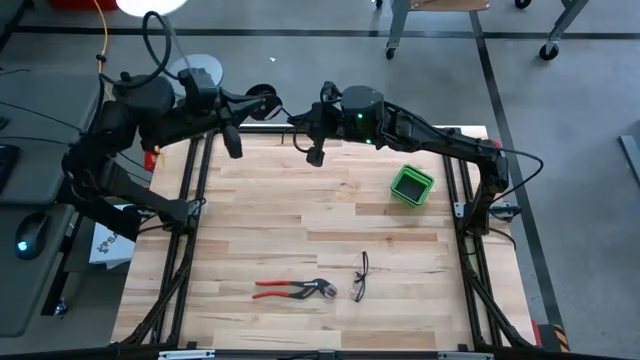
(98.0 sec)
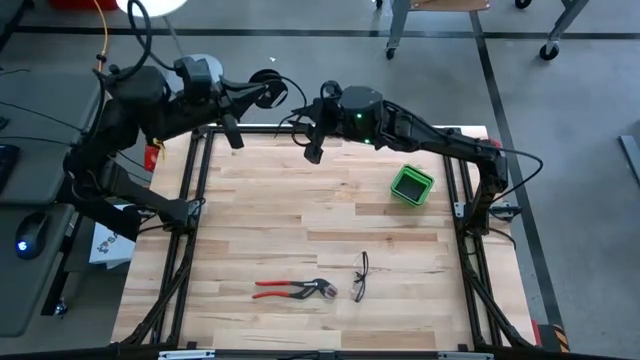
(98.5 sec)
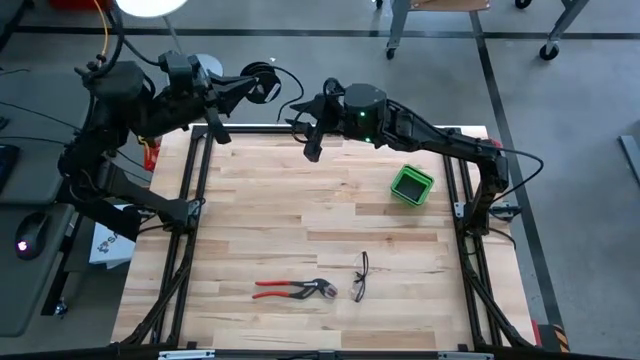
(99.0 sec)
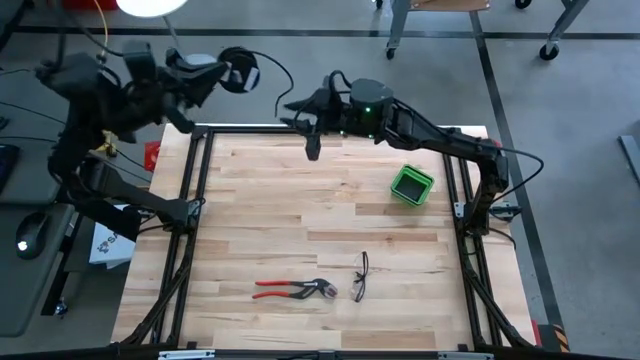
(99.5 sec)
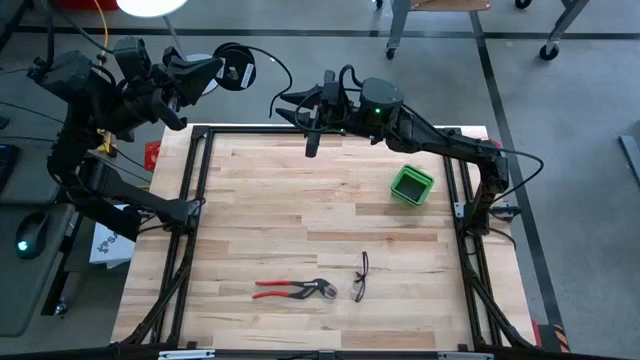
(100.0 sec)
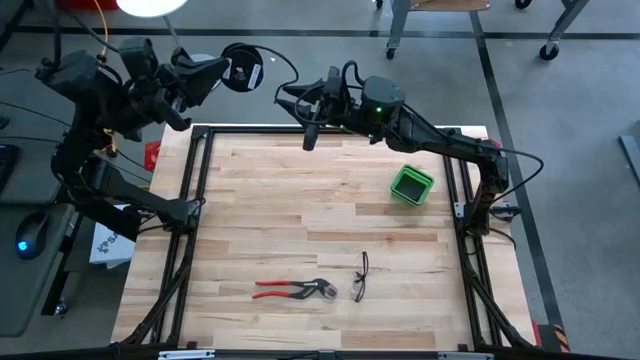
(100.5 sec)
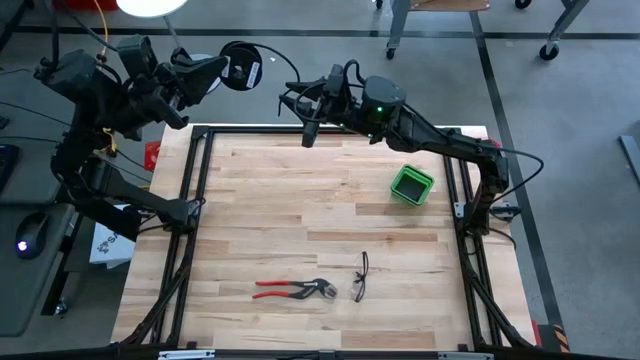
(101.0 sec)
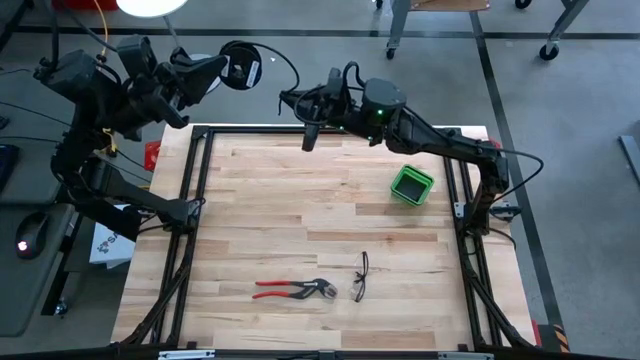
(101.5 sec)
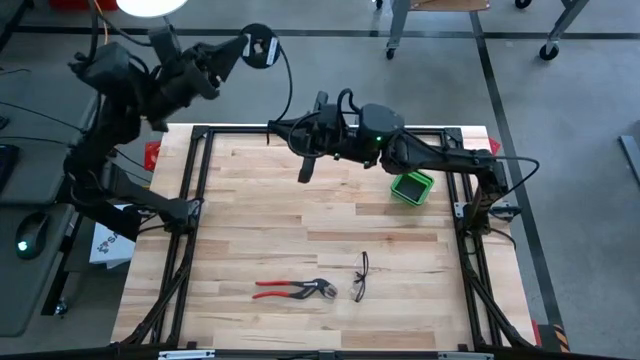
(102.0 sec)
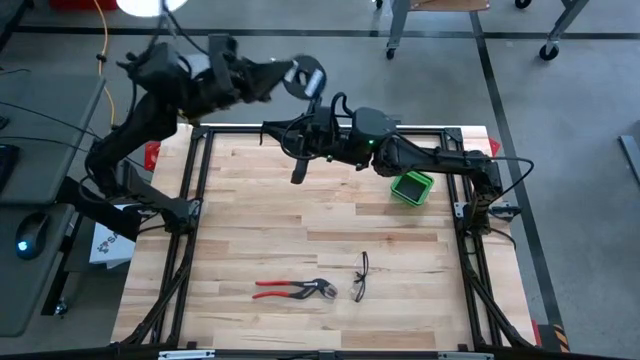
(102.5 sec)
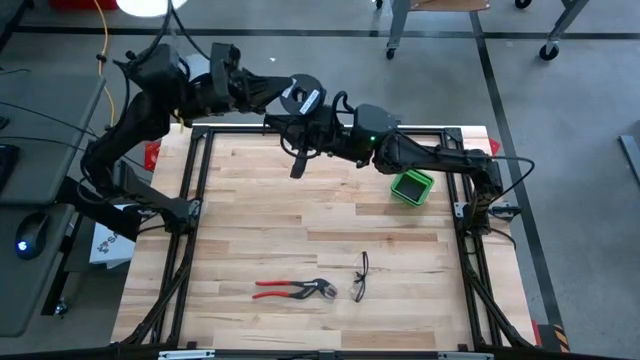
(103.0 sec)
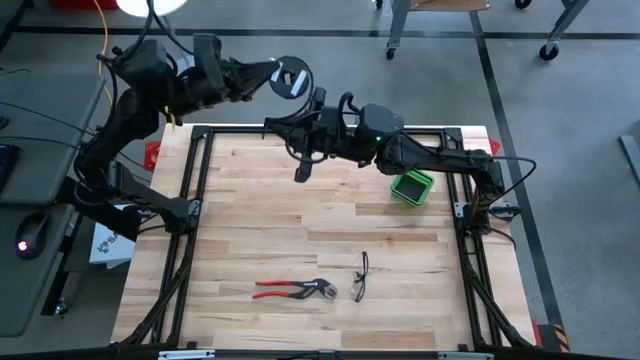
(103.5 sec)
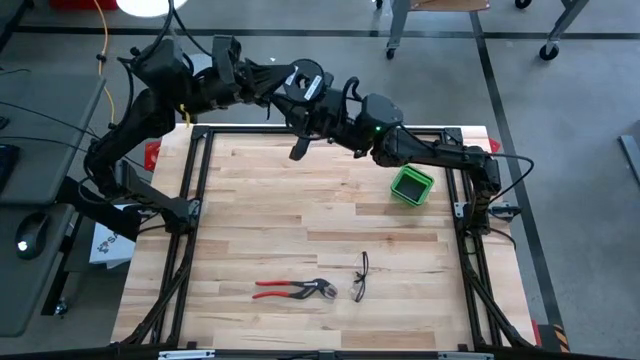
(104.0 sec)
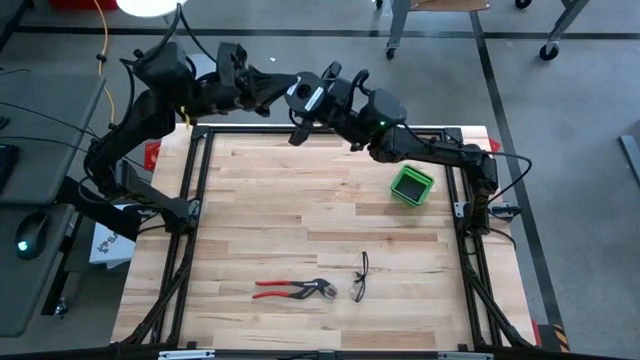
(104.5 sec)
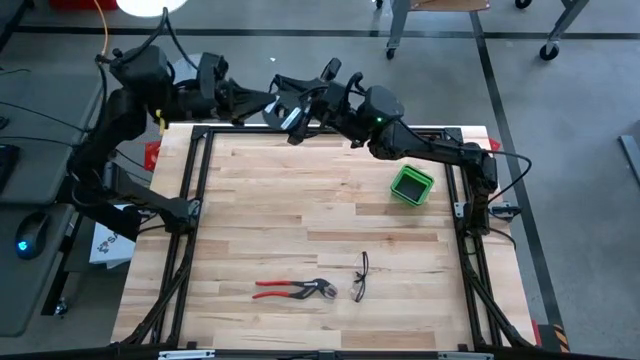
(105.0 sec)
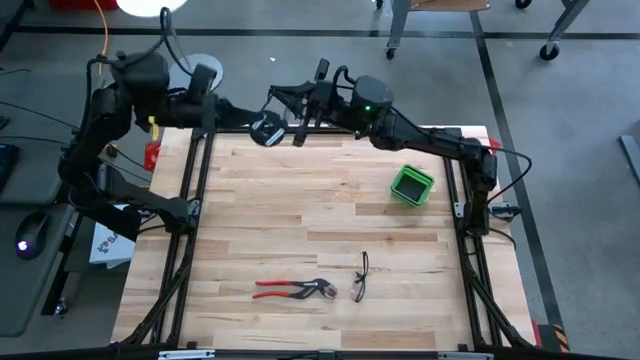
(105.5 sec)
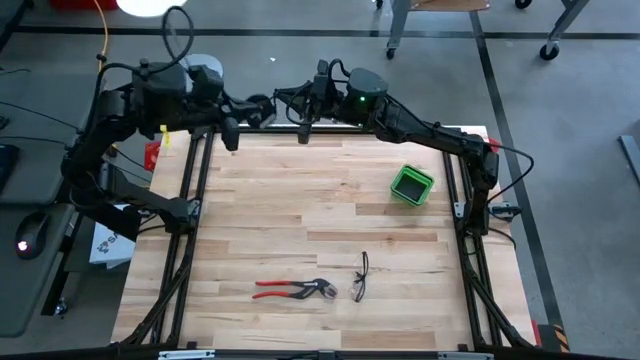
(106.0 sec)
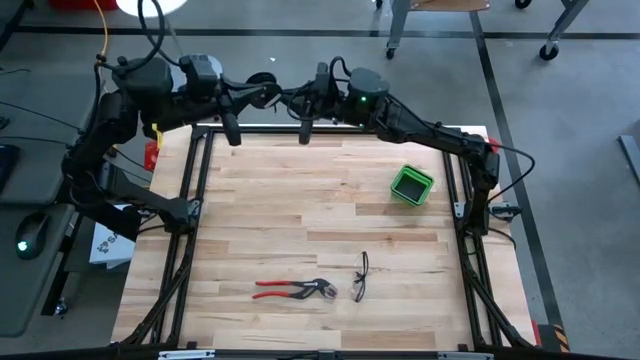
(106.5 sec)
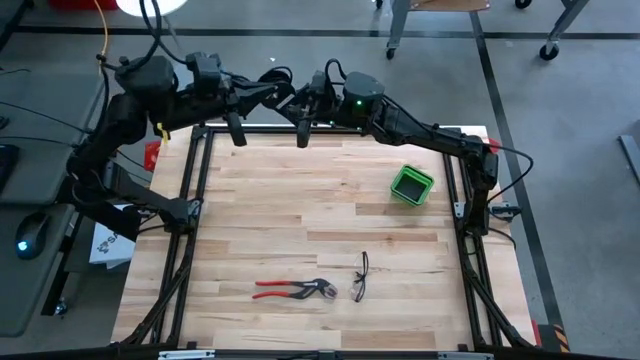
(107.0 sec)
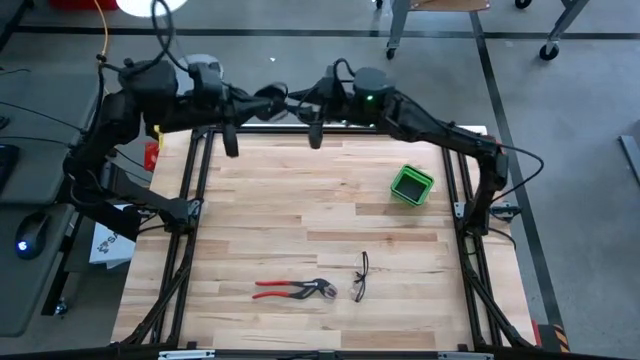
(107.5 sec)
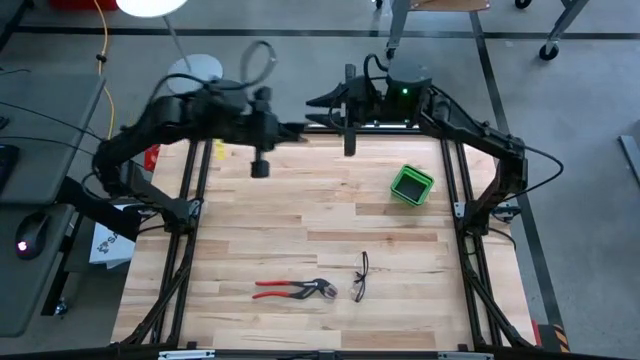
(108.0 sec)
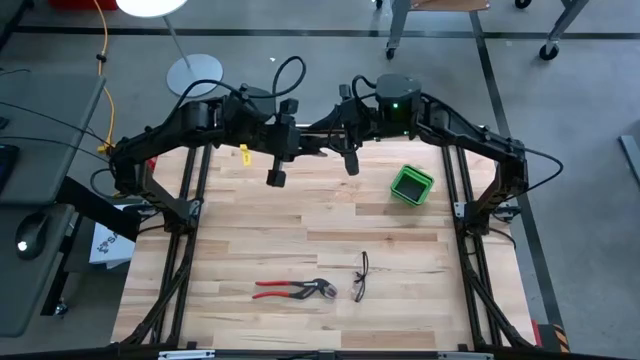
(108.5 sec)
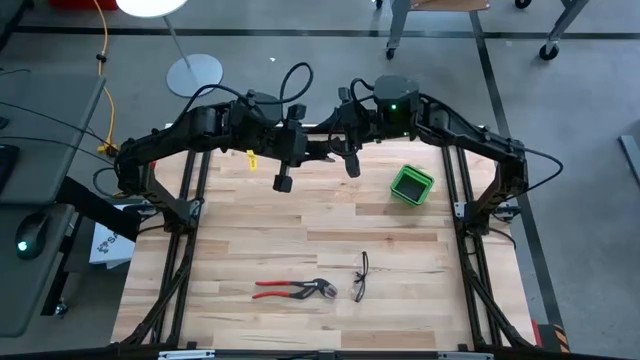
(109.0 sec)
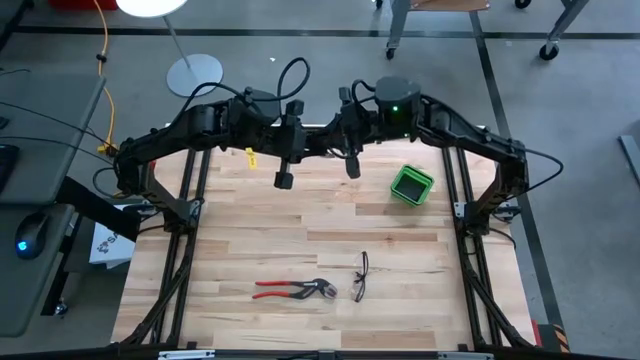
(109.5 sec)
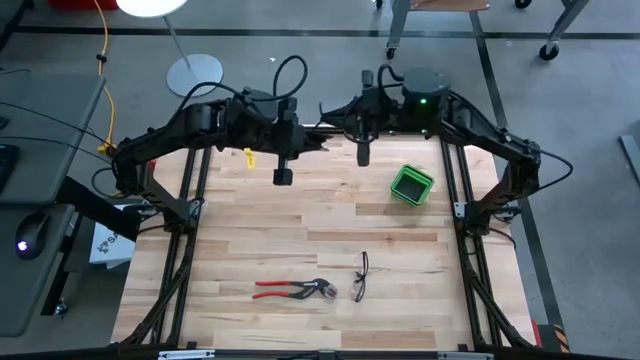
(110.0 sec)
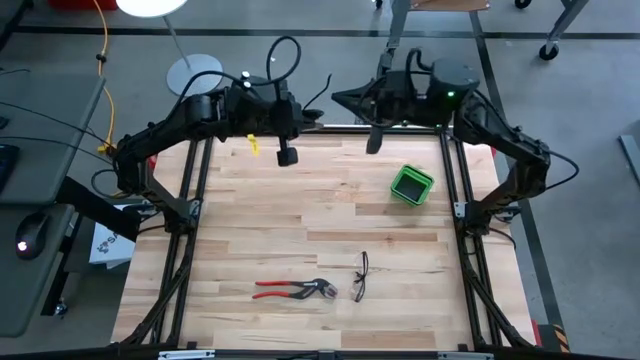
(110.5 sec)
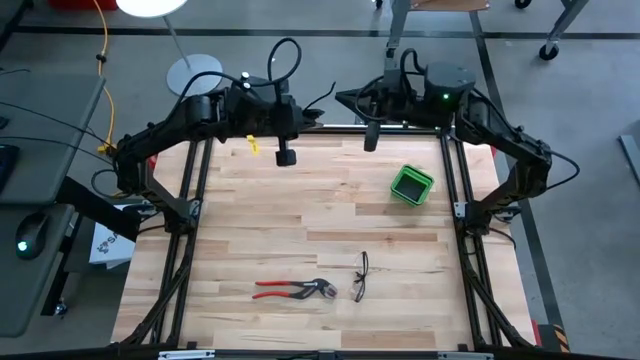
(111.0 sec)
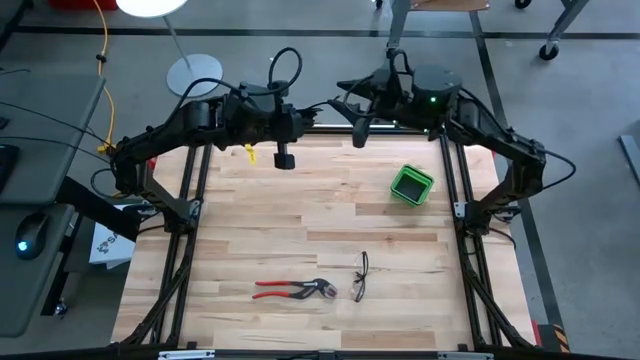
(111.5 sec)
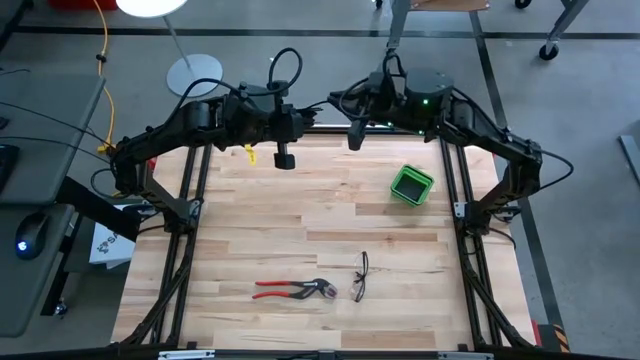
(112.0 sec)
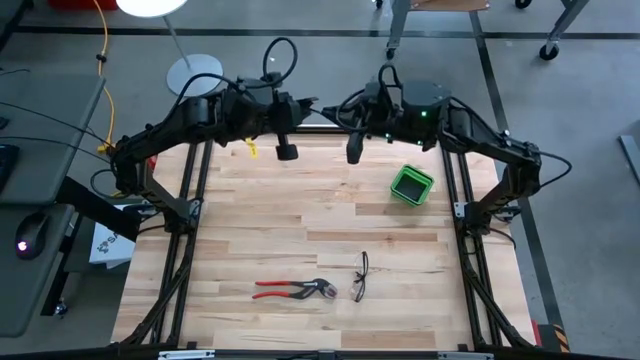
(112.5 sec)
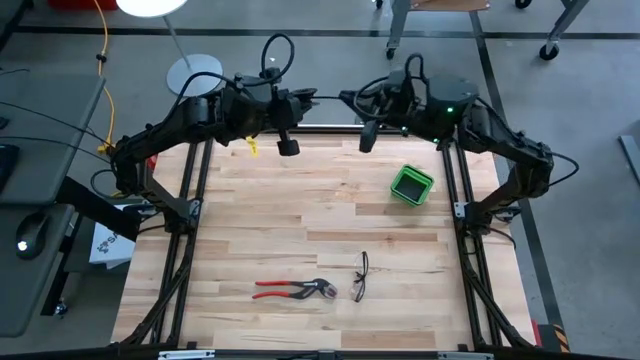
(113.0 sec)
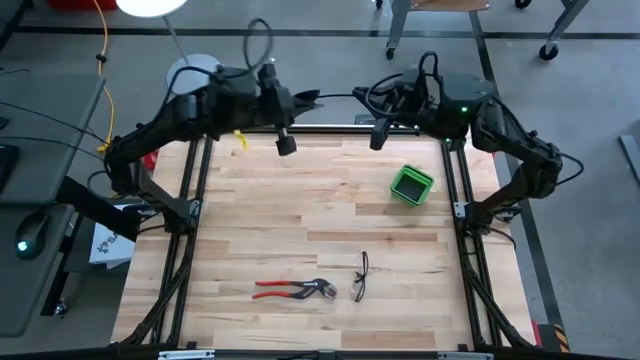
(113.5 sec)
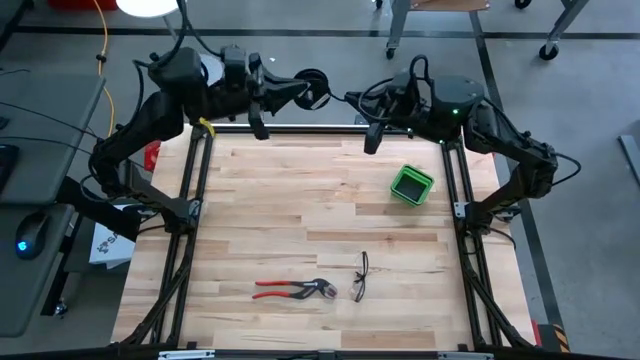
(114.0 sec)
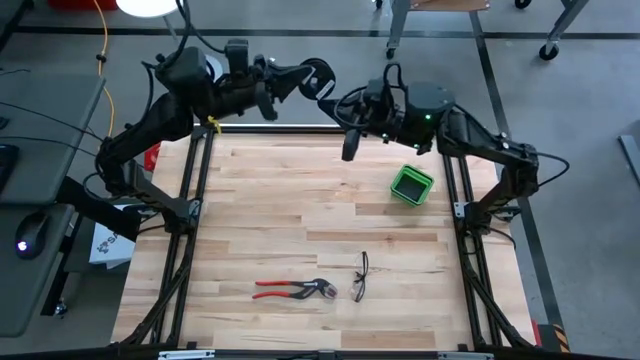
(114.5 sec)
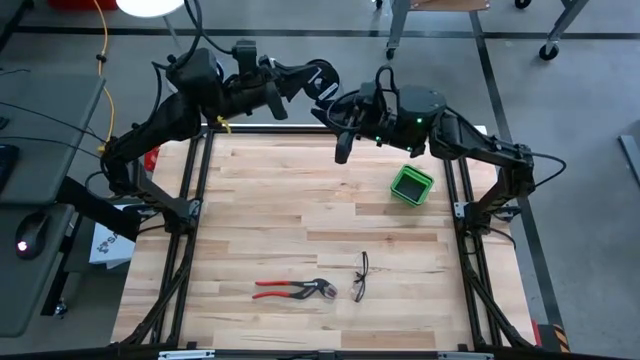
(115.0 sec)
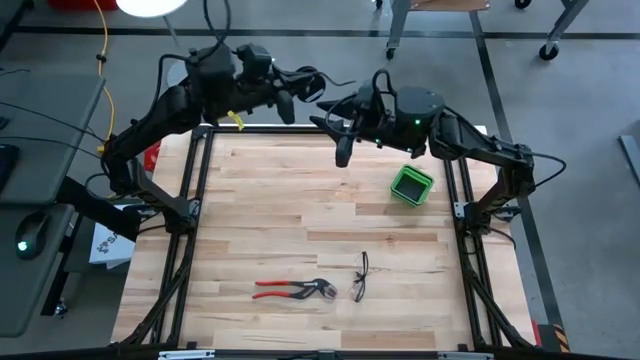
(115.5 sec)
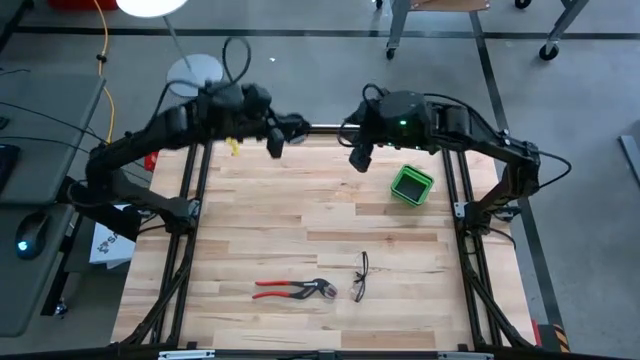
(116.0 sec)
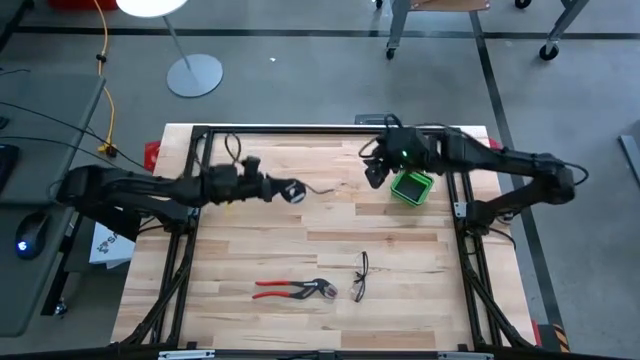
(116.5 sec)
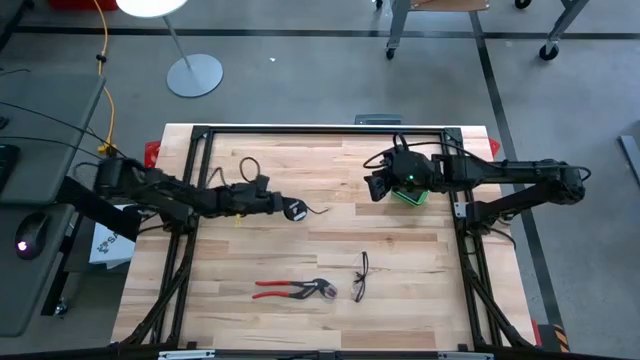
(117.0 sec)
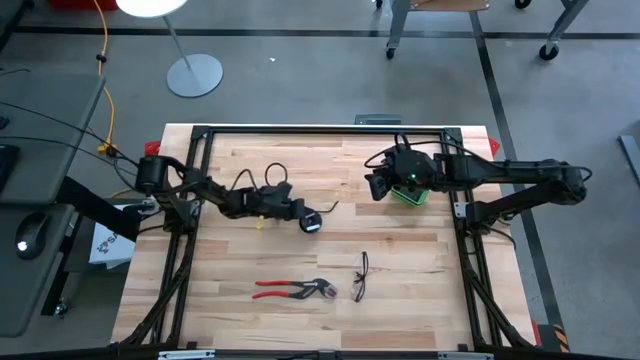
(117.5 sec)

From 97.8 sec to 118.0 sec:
Task: Coil cords
Coil the black wire on the black spool

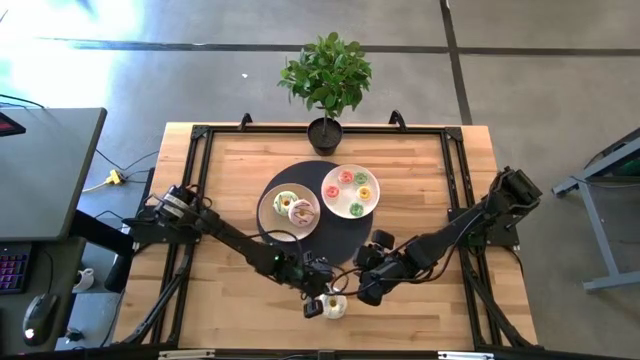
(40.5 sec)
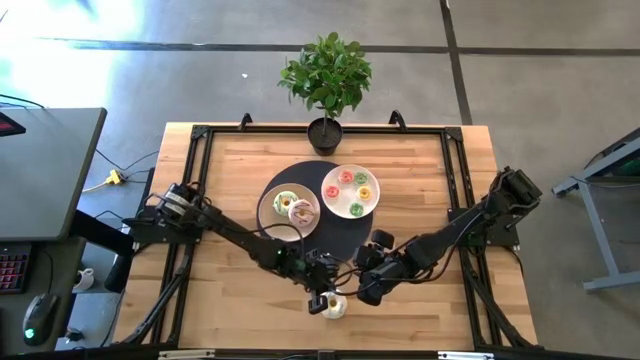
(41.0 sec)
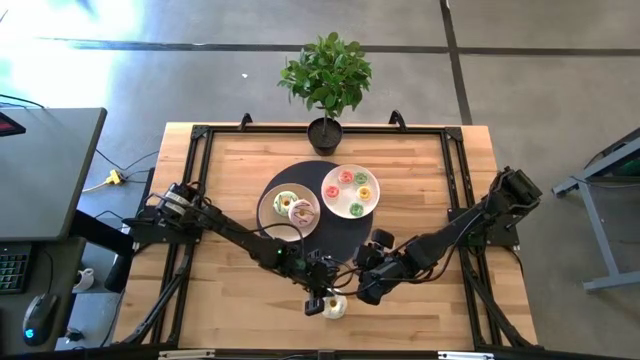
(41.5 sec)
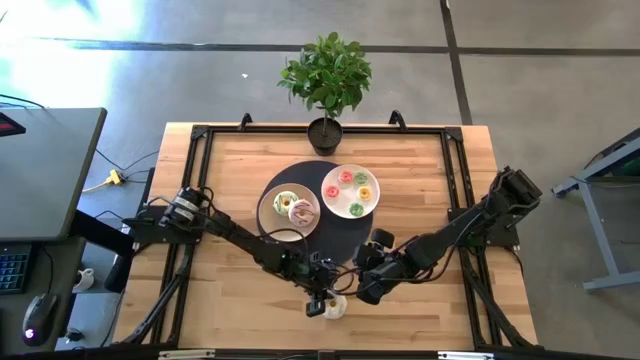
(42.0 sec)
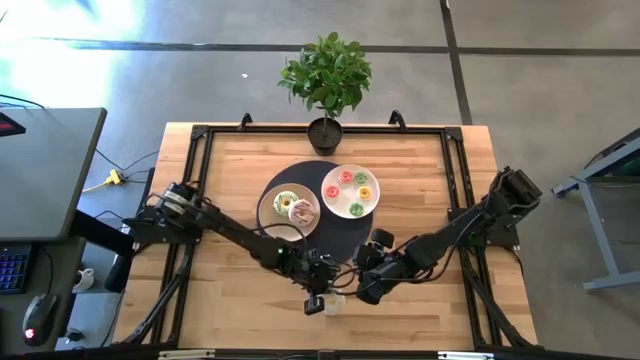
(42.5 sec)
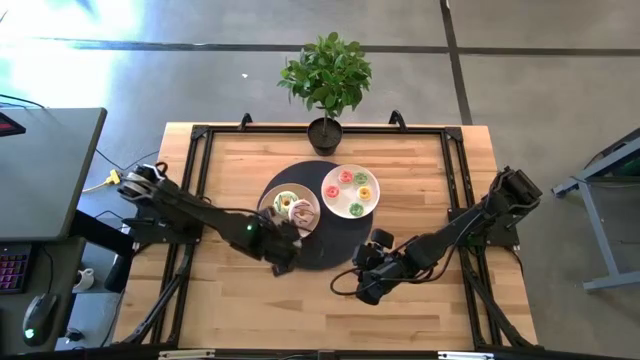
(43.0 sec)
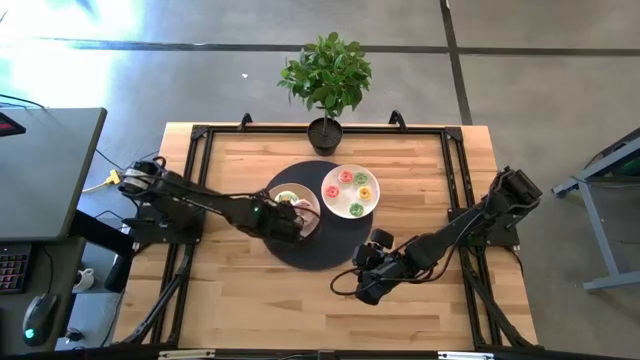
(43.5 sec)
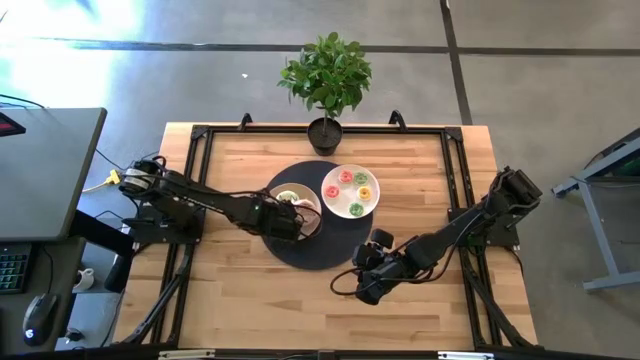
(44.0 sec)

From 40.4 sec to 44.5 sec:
Task: Pick & Place donuts
Put the big white donut on the left white plate
